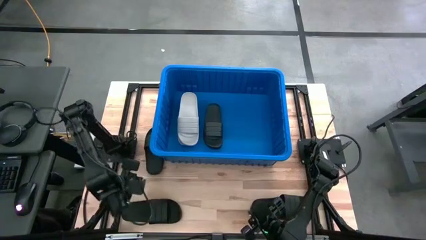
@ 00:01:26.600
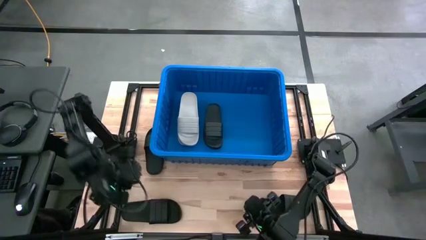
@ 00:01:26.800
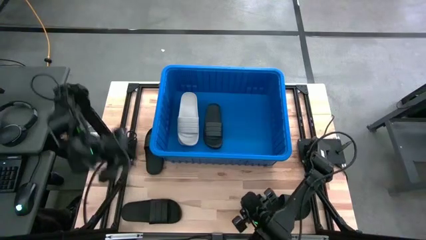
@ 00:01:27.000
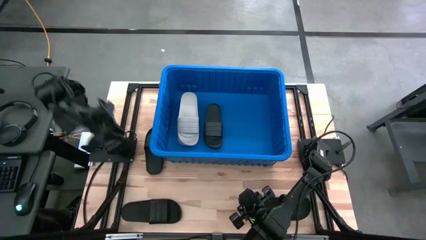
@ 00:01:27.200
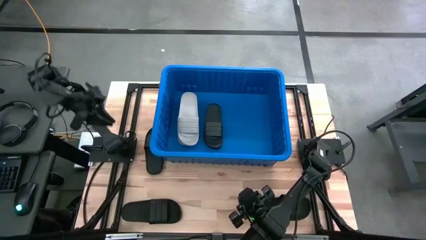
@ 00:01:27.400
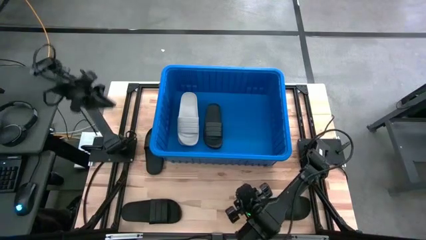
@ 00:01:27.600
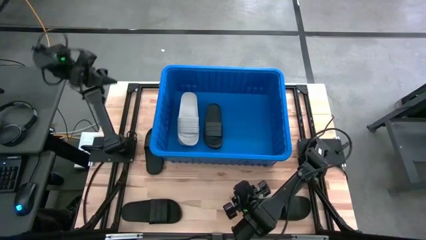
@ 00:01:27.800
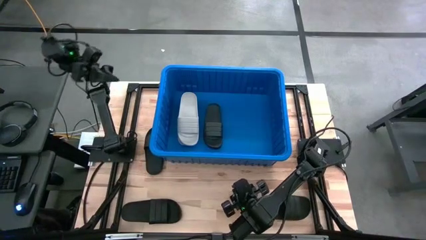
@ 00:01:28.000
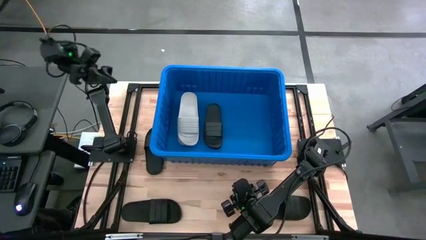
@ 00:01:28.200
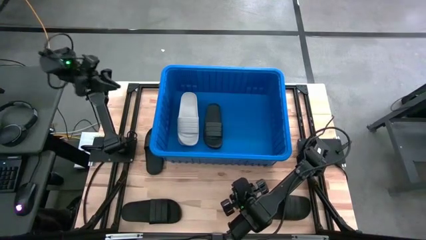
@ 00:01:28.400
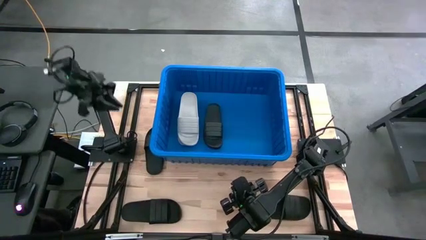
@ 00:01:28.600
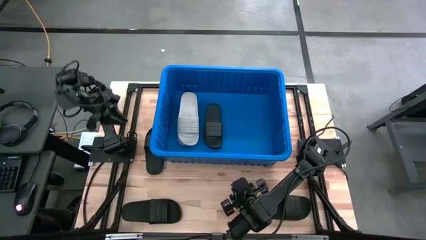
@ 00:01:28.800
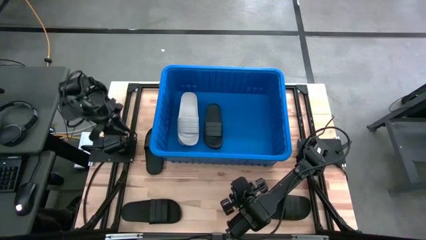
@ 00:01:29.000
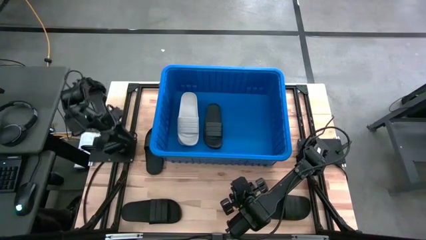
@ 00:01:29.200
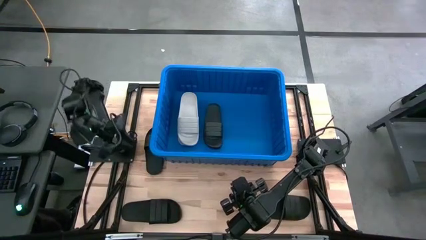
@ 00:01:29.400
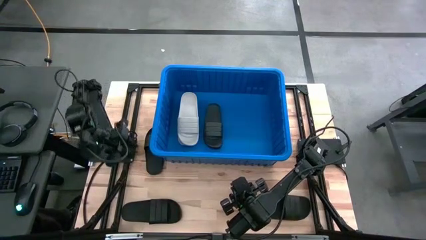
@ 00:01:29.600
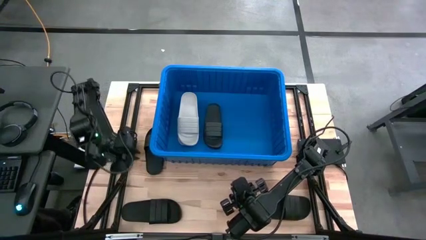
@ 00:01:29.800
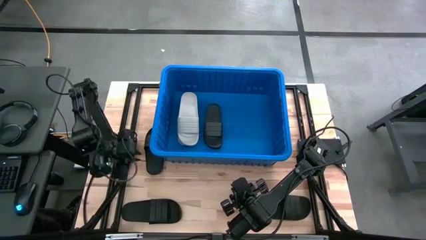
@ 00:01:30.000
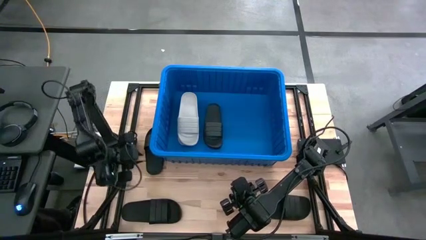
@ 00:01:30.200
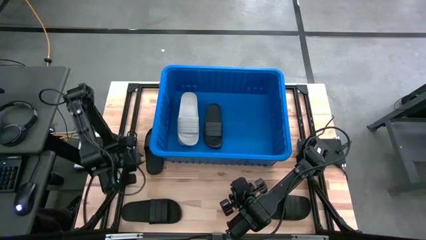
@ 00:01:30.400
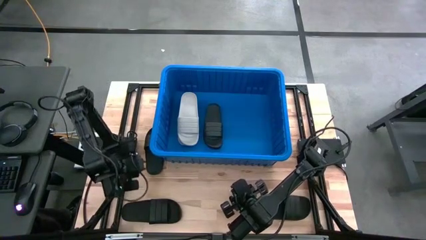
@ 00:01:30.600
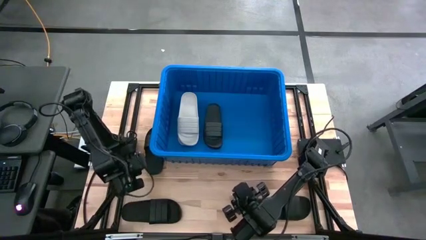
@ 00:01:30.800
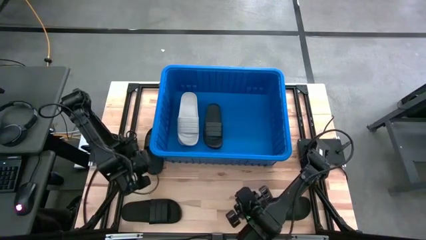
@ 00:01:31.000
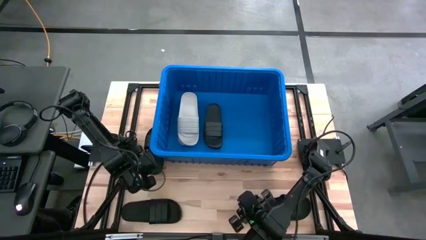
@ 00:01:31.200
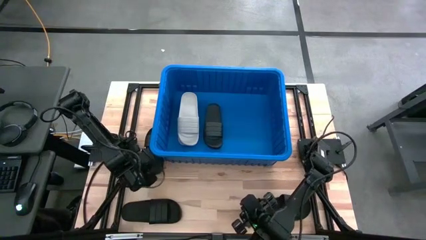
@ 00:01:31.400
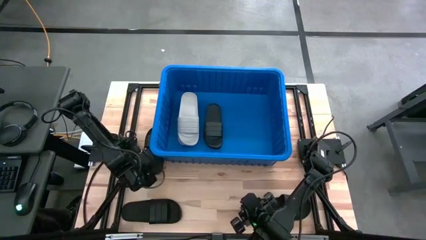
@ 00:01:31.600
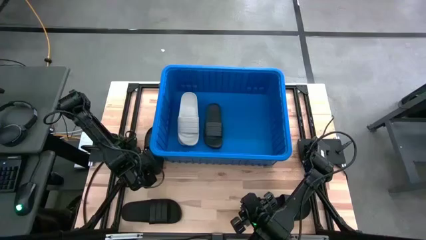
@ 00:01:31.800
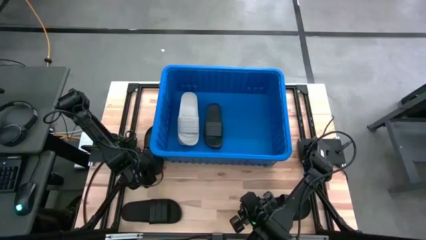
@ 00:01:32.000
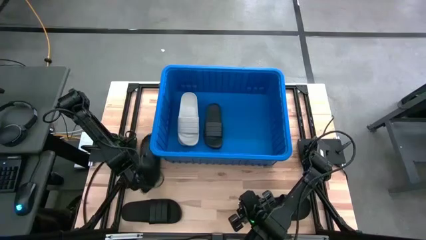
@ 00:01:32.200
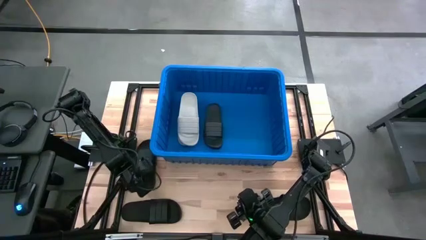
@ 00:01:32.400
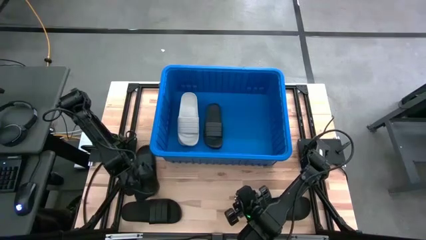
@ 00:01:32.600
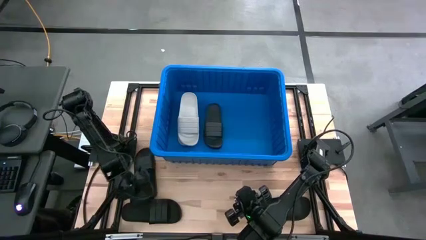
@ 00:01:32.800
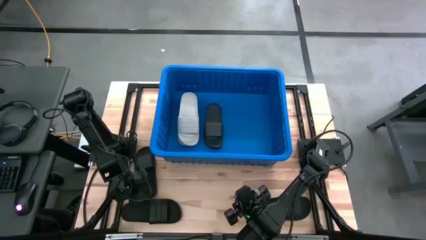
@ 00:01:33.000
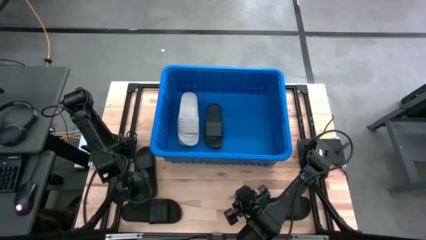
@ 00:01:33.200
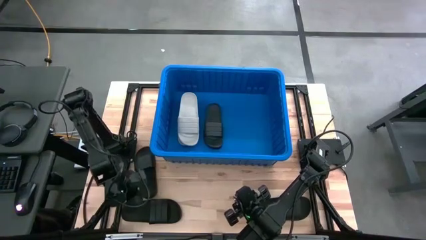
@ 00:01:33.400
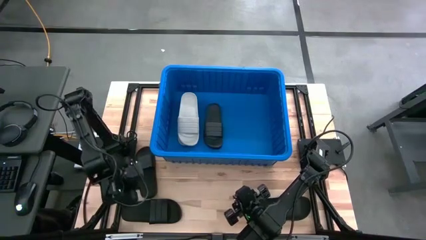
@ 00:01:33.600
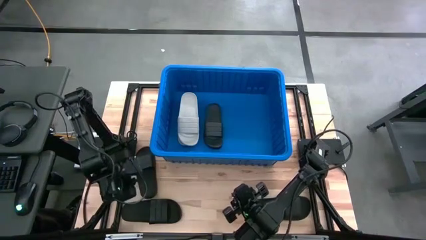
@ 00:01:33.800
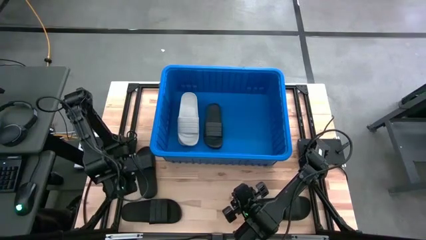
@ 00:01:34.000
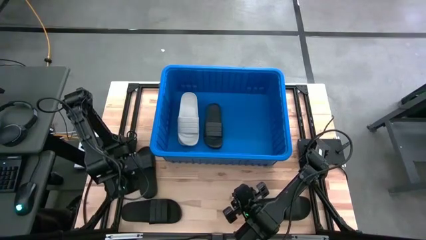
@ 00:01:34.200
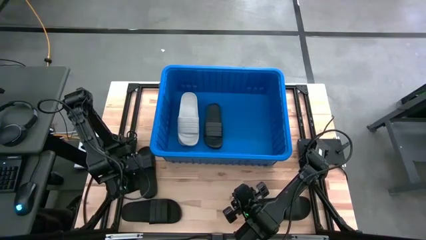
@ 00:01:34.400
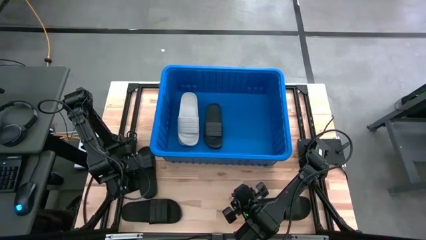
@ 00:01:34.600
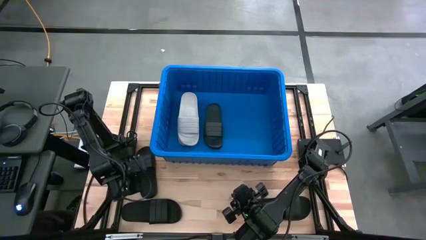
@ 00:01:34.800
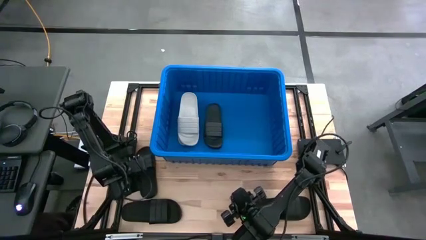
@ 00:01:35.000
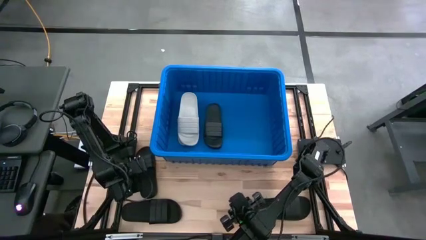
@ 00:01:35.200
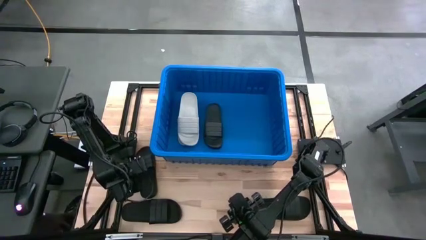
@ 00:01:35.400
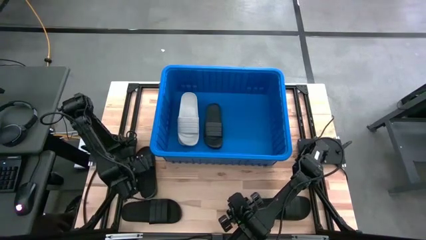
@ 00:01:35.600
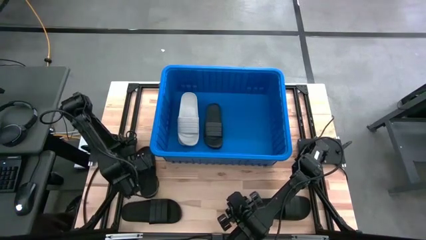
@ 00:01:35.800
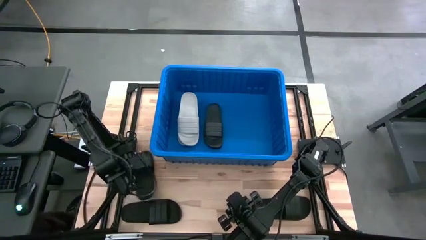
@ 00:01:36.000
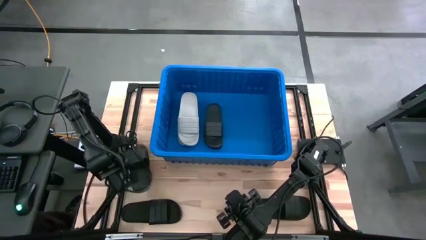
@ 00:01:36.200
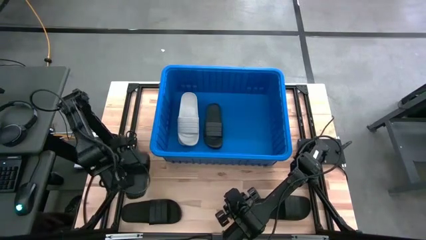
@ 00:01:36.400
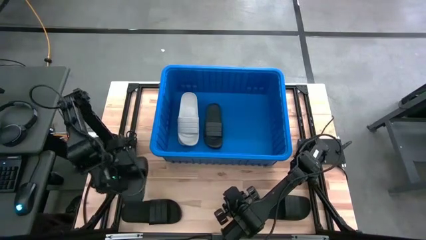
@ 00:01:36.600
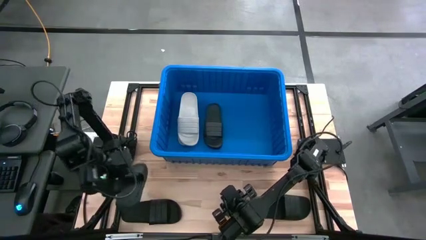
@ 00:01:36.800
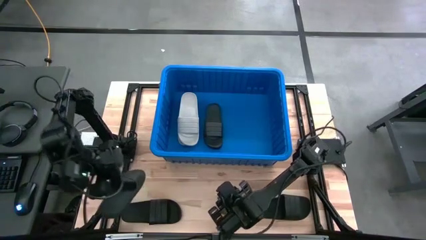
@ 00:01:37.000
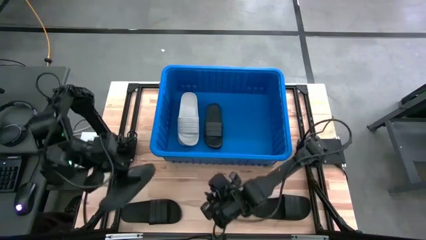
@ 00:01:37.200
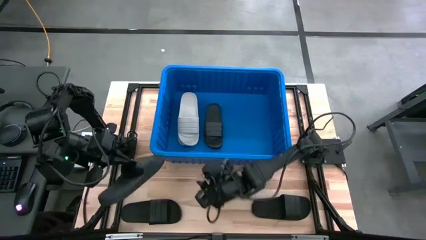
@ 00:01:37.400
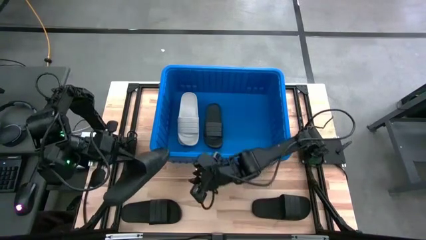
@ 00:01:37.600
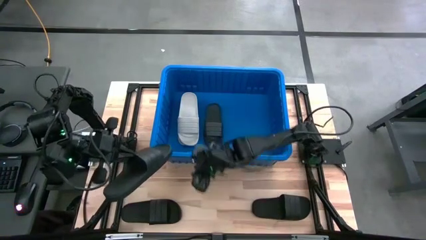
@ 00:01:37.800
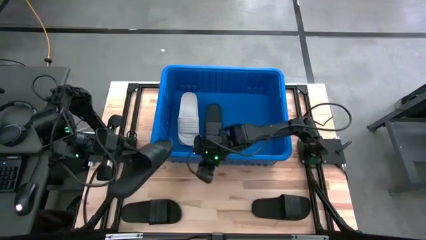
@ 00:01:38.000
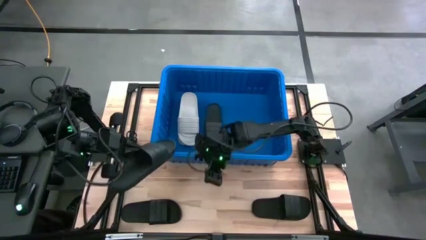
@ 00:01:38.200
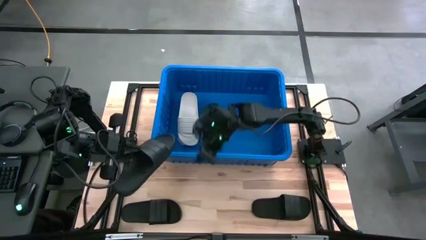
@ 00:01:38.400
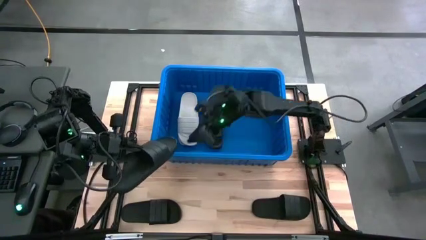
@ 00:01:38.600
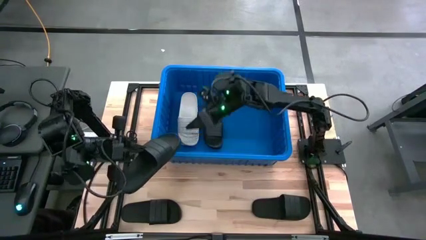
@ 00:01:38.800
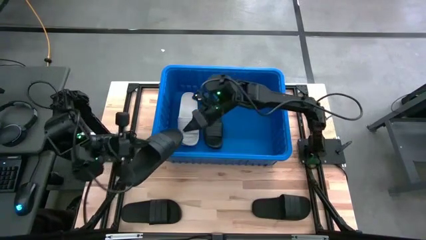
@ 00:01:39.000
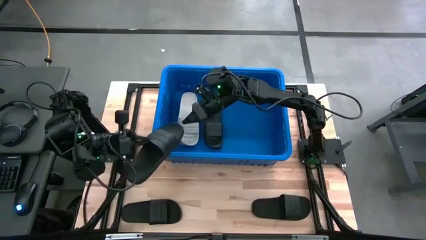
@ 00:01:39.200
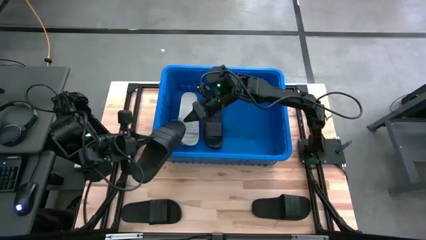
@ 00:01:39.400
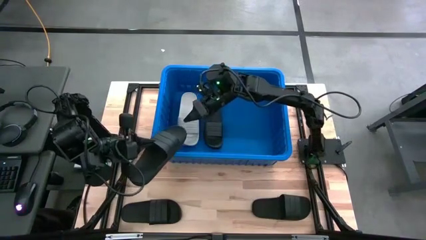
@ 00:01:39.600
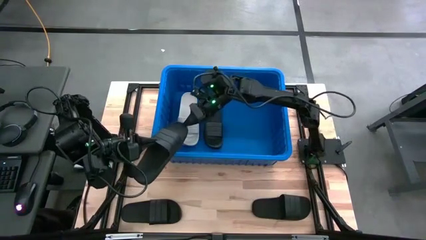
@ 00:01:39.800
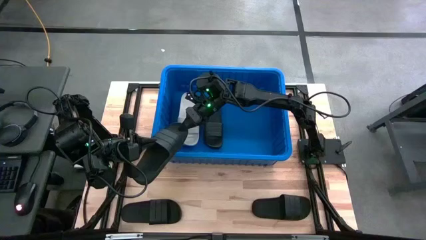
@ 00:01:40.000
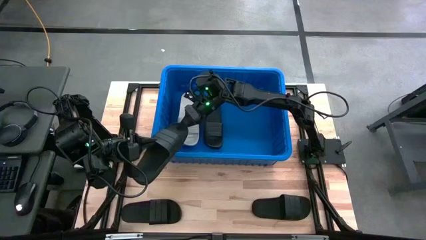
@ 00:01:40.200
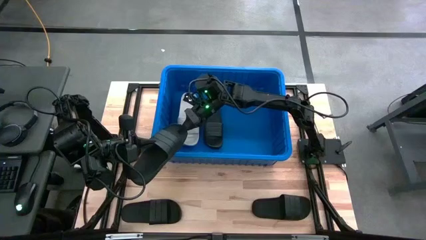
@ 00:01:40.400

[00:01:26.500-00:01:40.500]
Task: Pick and place slides into bin
Stack the black slide on top of the black slide in the blue bin
